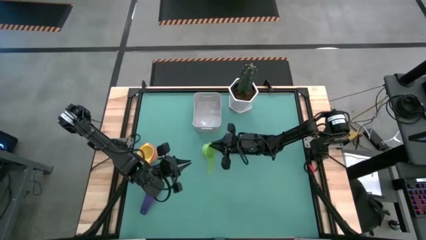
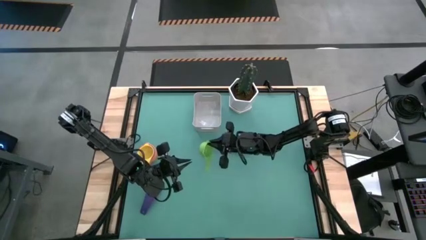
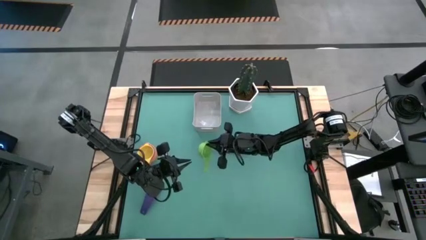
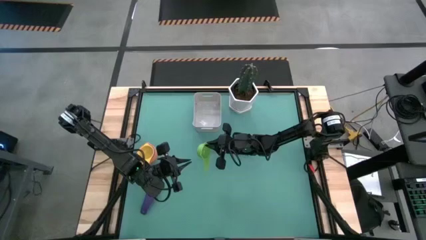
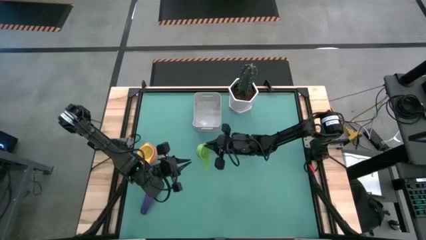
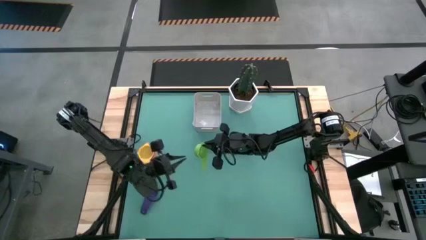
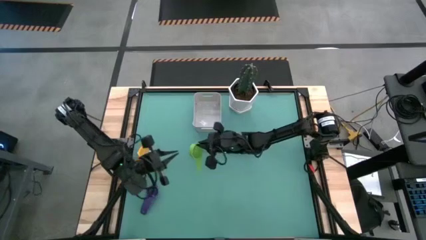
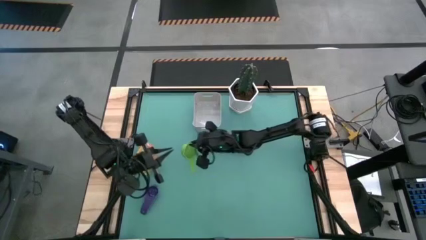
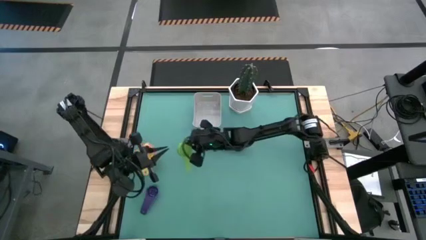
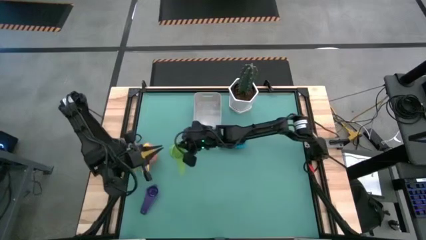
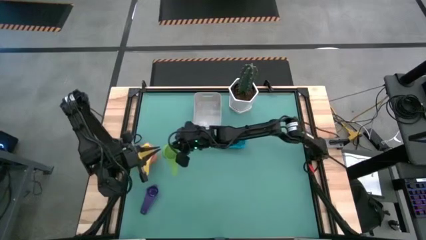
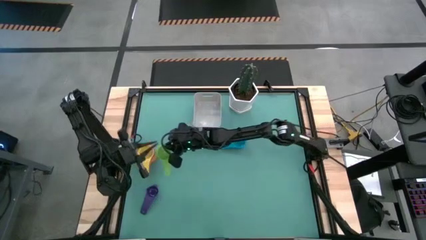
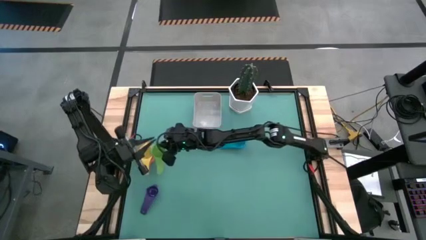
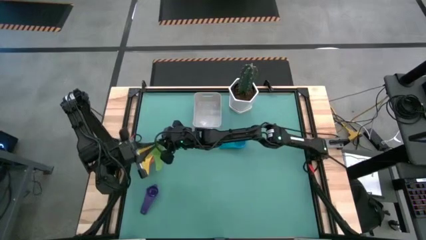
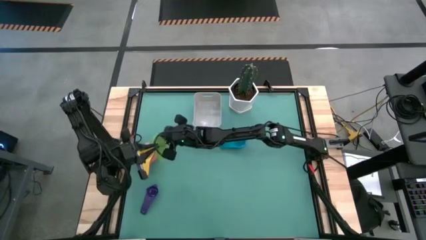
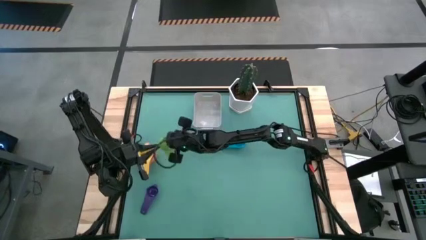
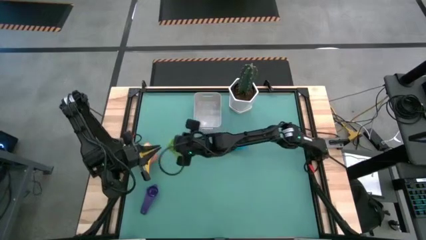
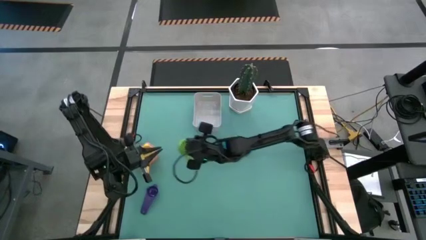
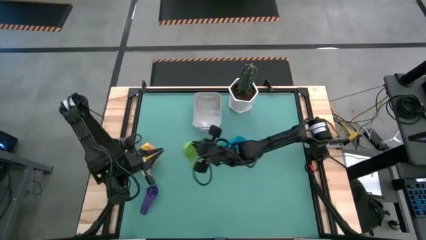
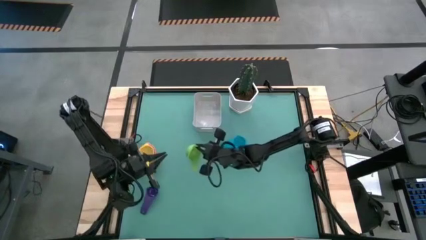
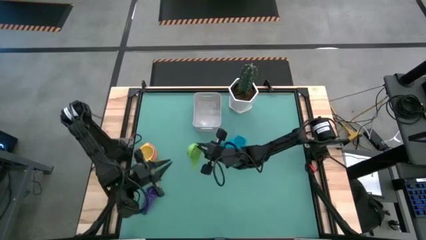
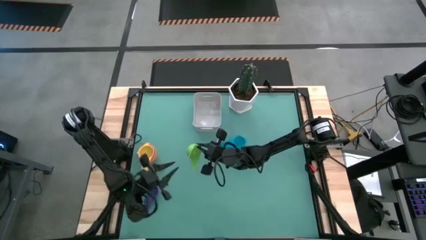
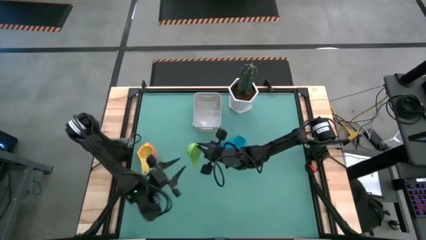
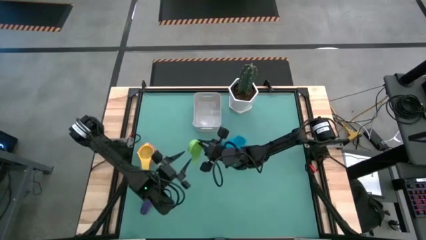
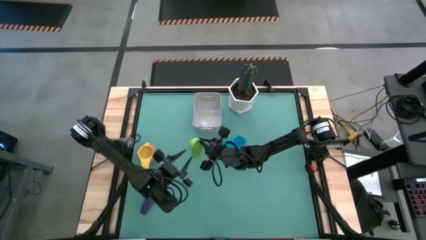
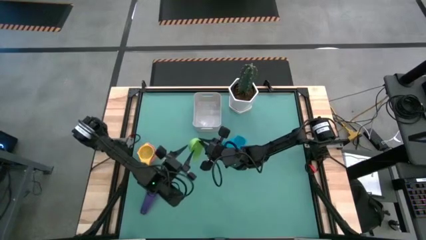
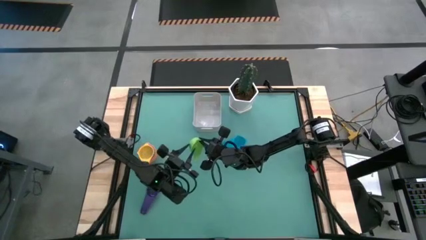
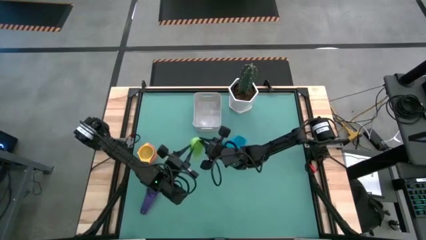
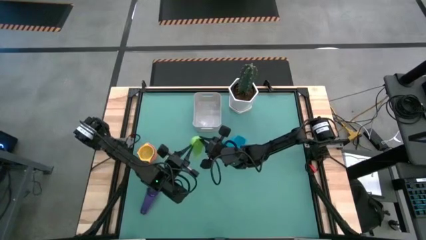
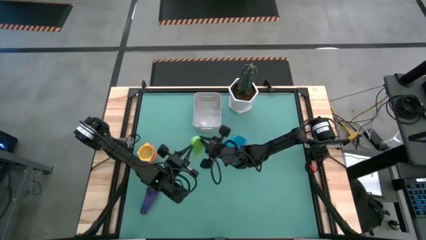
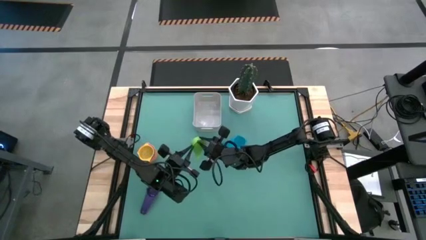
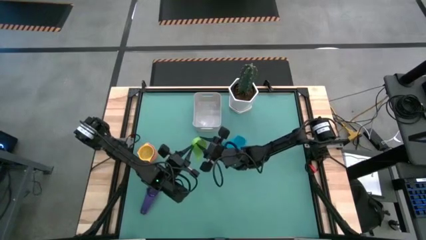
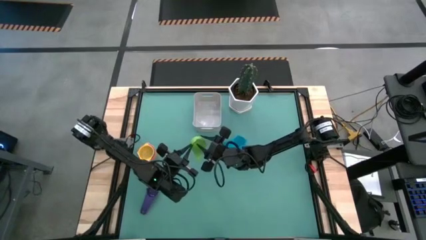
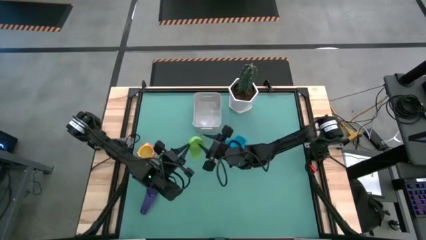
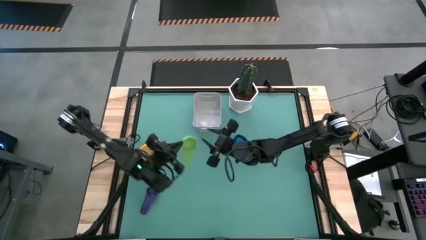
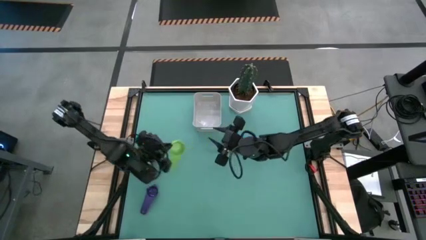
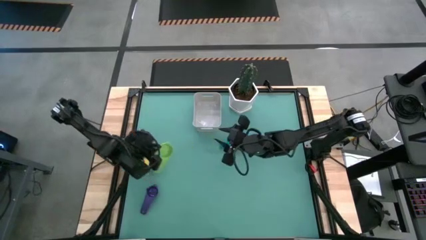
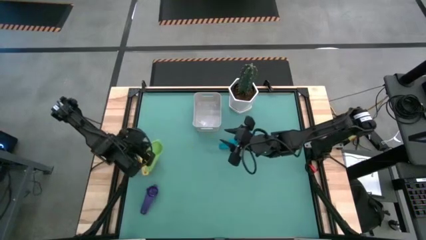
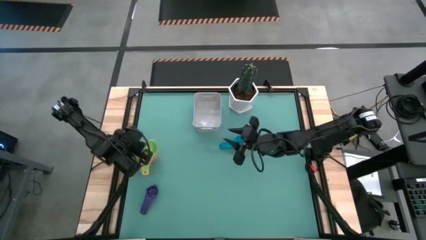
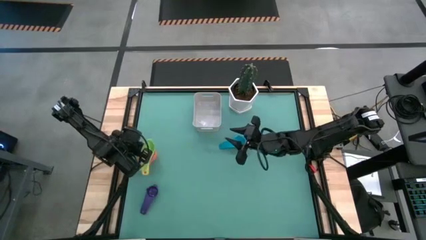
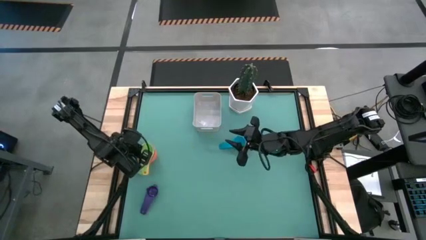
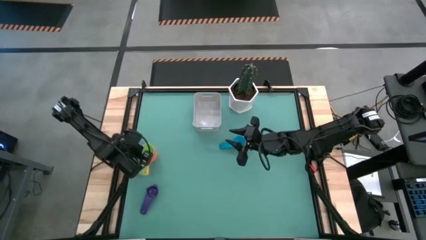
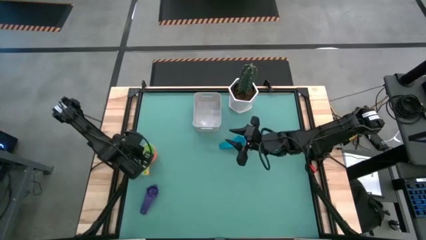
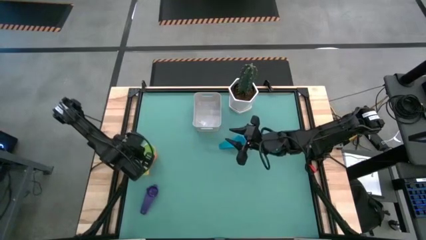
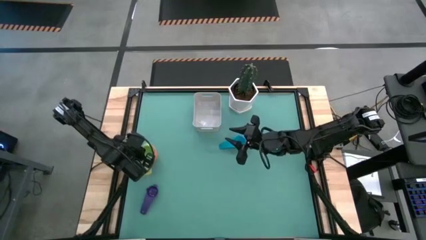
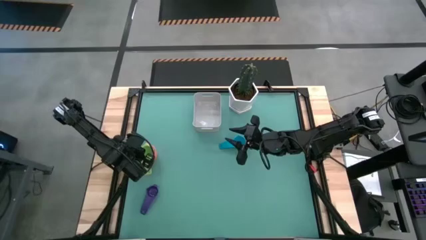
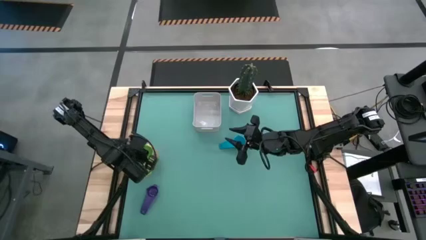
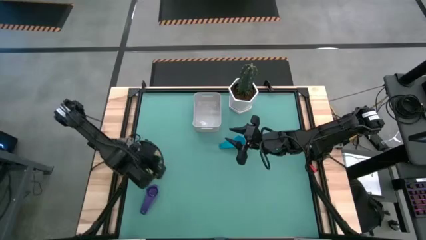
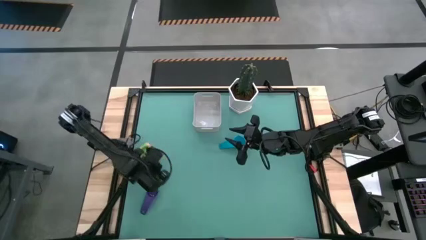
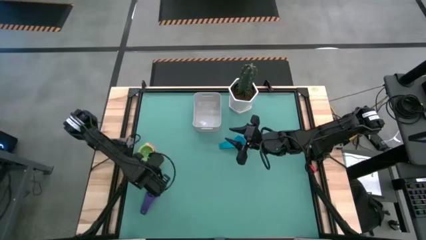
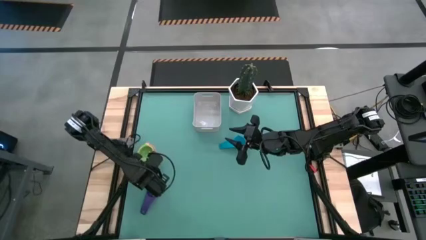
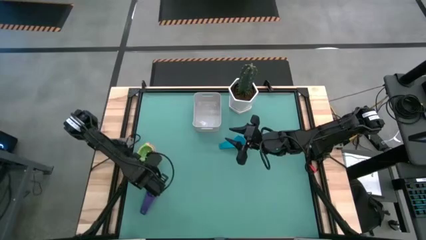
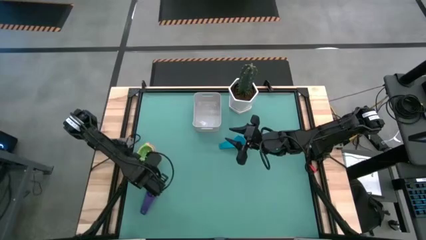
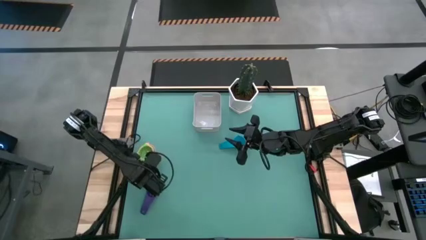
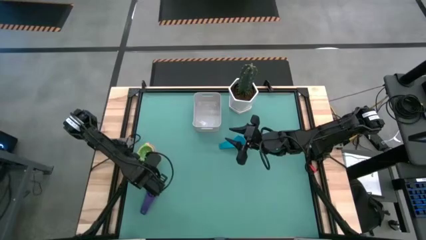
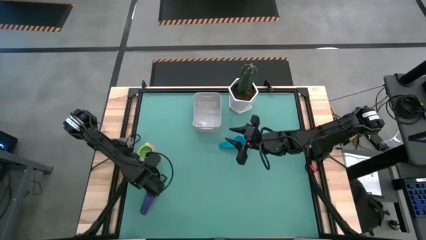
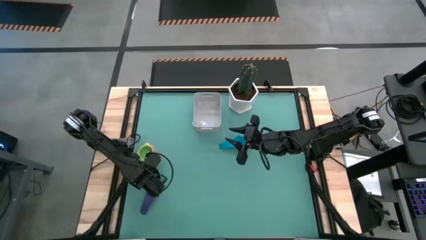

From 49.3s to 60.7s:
Task: Nest measuring cups in basket
Stack the green measuring cup on top of the yellow measuring cup

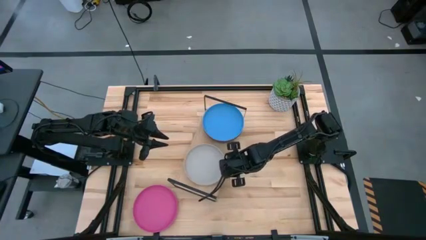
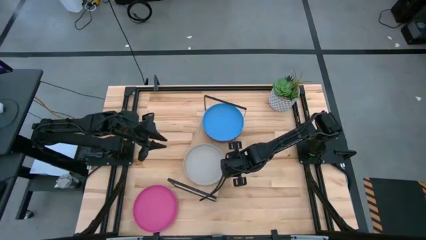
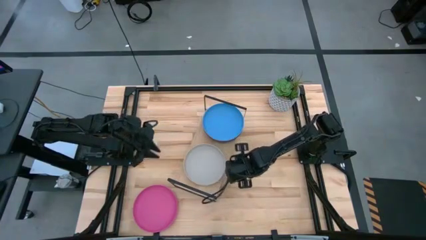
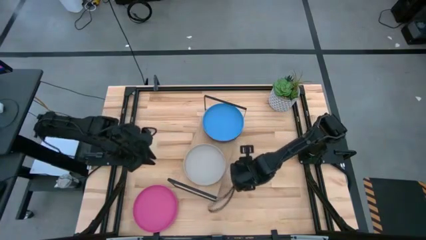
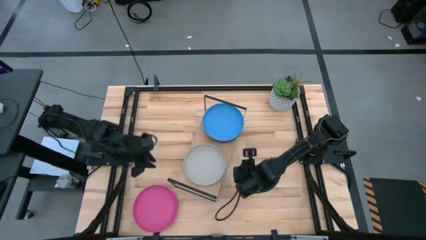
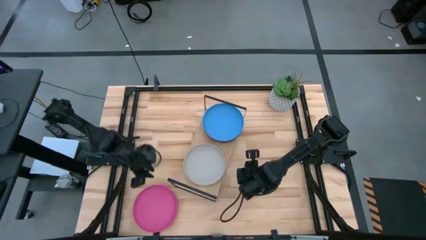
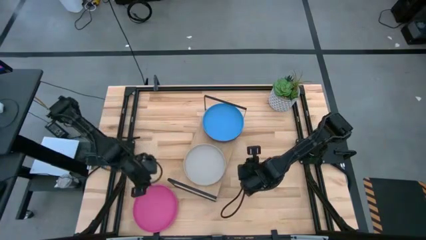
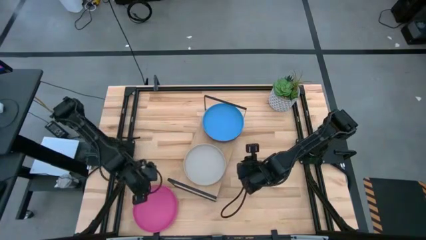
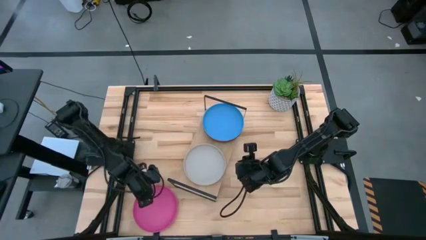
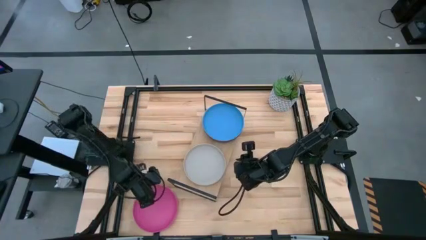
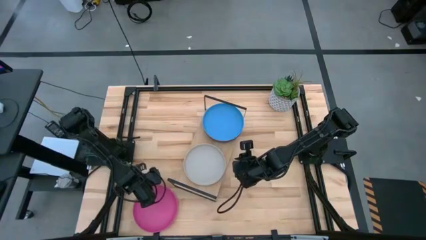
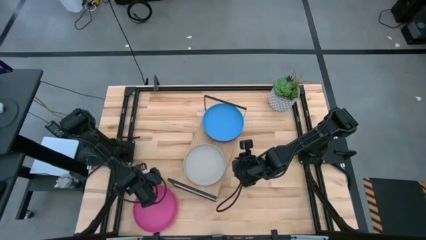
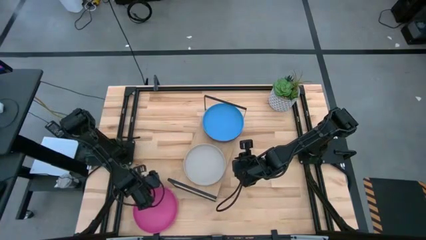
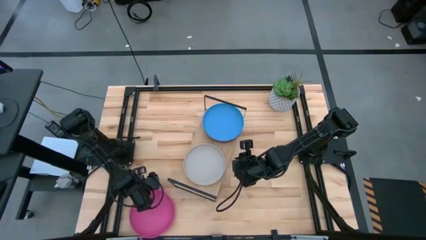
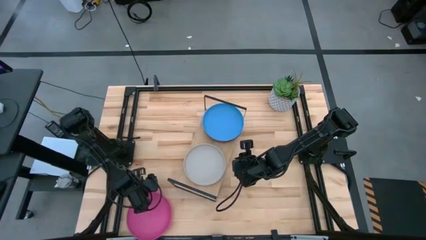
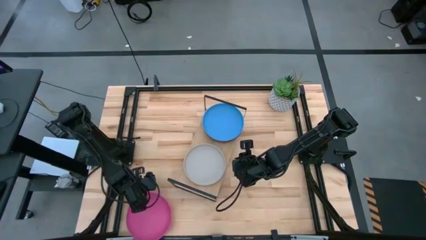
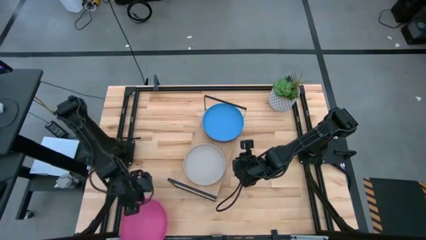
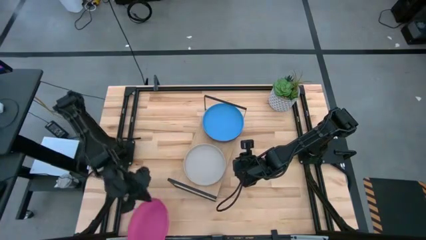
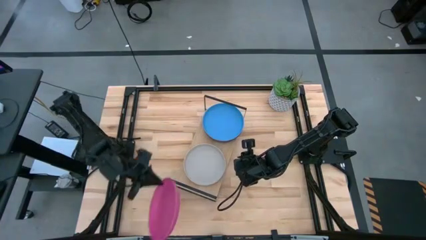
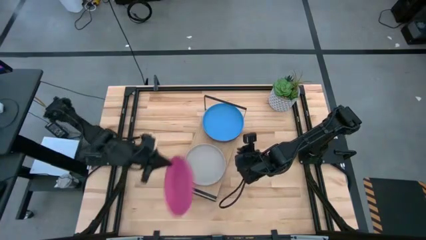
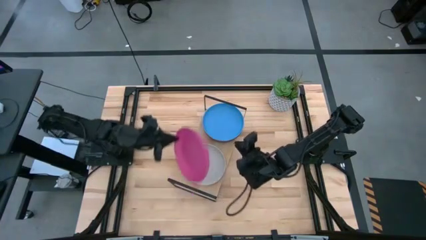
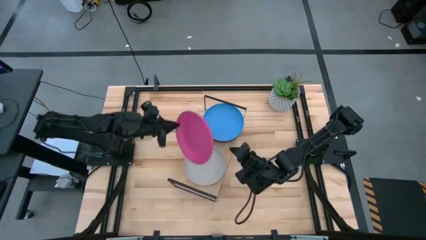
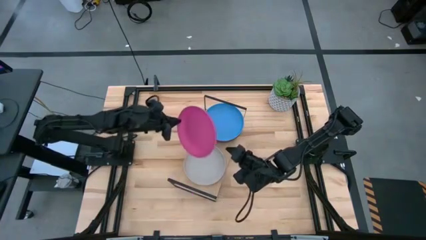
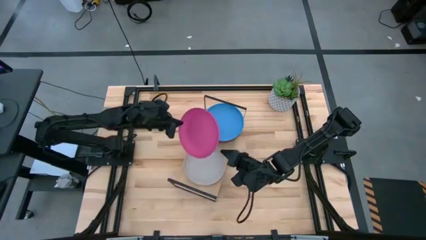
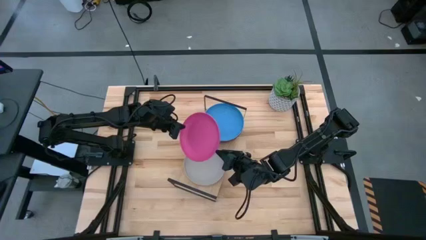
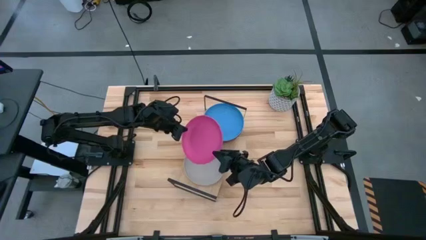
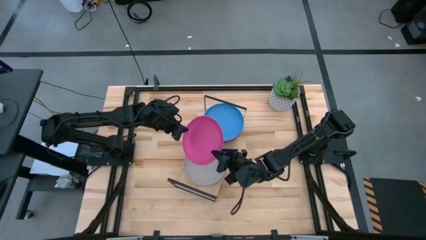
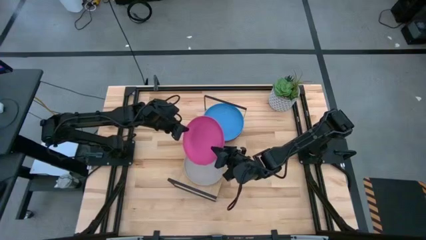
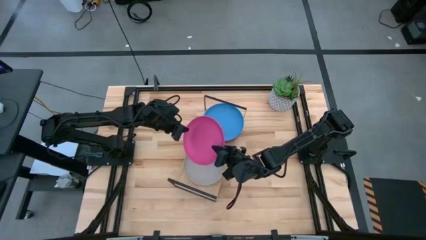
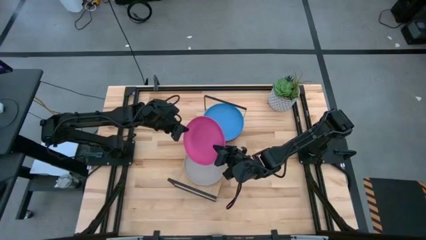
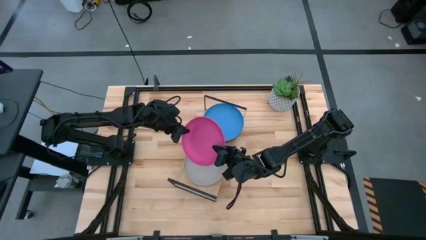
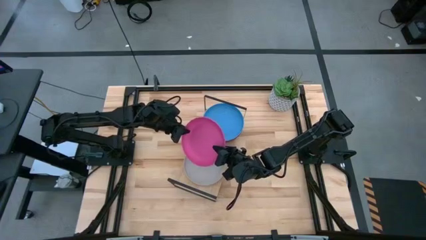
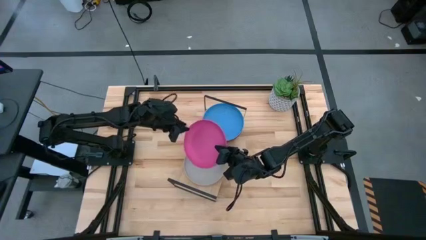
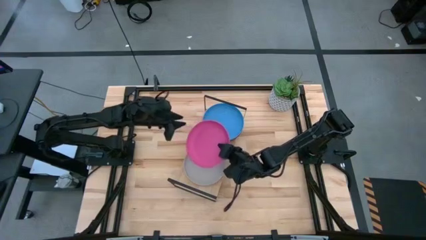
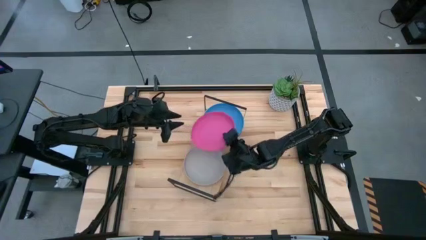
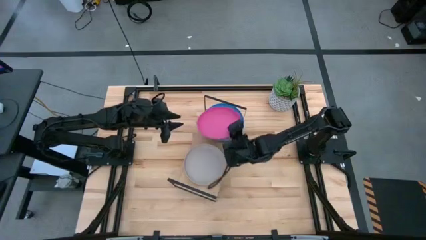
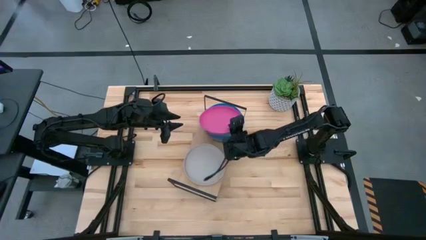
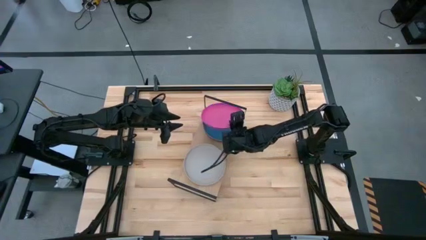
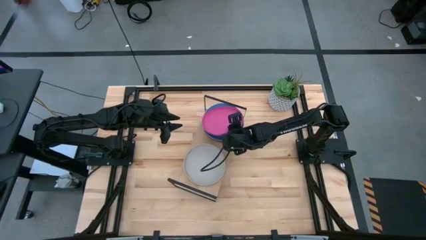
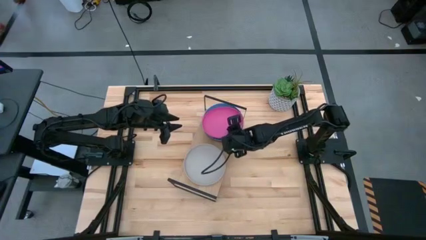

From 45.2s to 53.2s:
Task: Place and stack plates onto a shelf
Stack the pink plate on top of the blue plate on the shelf
